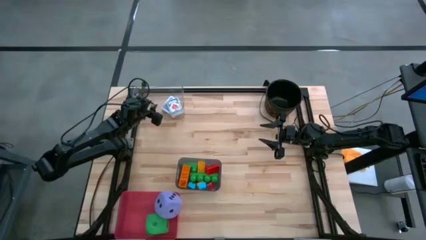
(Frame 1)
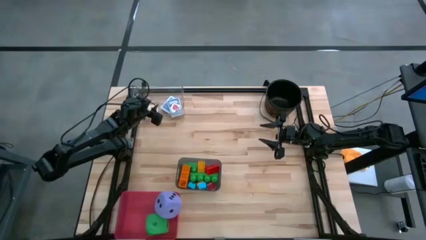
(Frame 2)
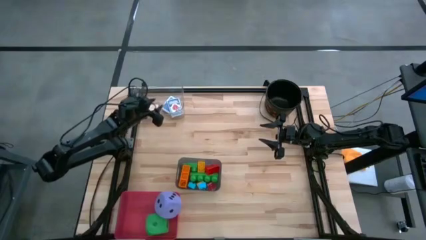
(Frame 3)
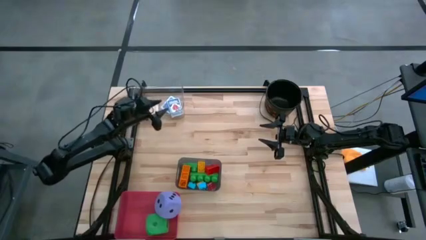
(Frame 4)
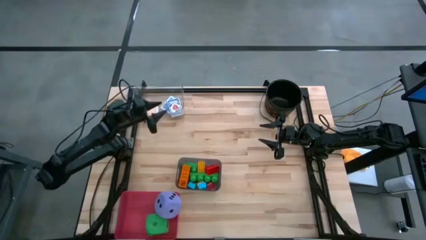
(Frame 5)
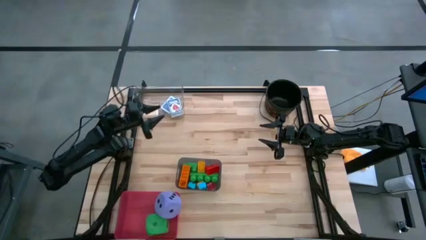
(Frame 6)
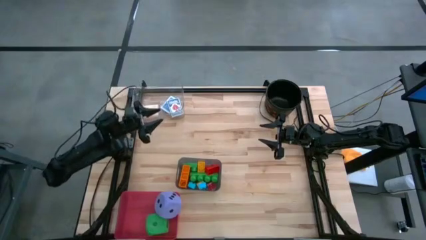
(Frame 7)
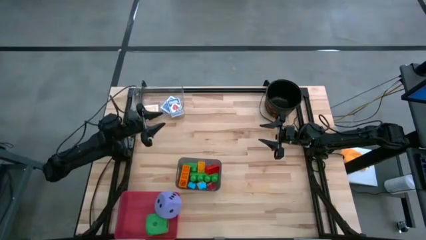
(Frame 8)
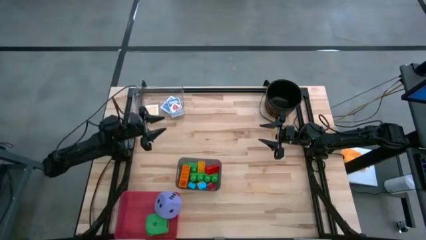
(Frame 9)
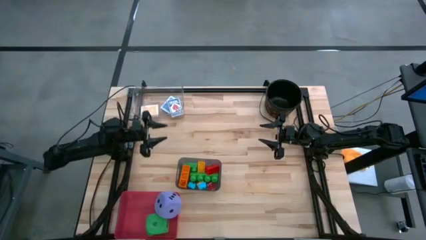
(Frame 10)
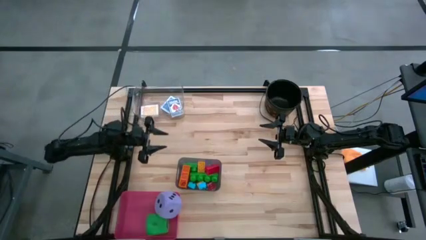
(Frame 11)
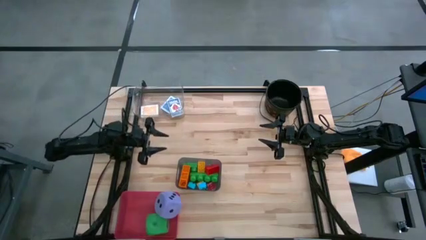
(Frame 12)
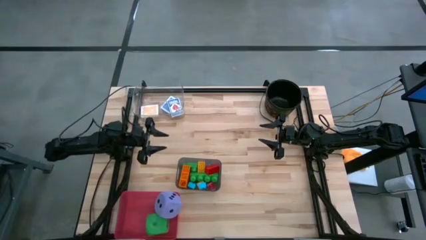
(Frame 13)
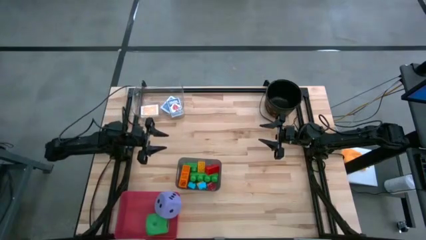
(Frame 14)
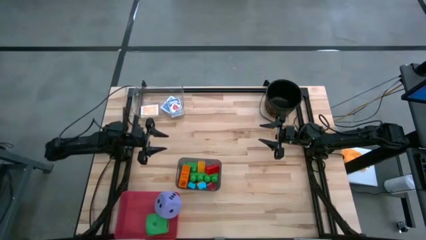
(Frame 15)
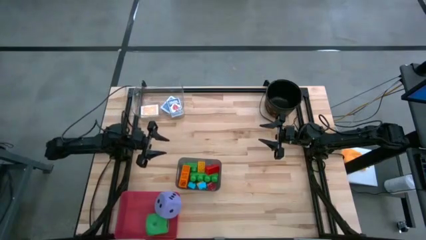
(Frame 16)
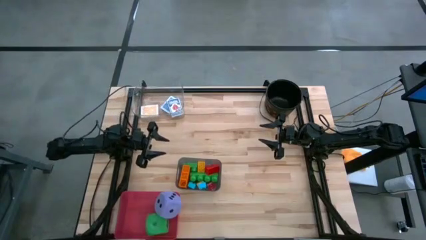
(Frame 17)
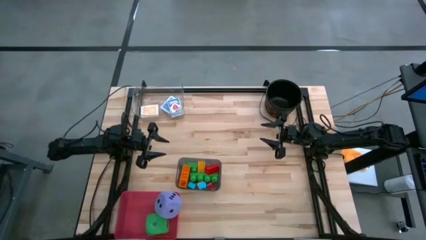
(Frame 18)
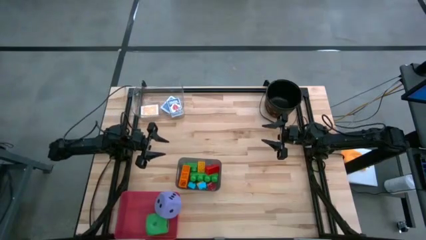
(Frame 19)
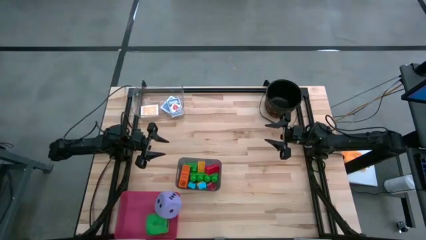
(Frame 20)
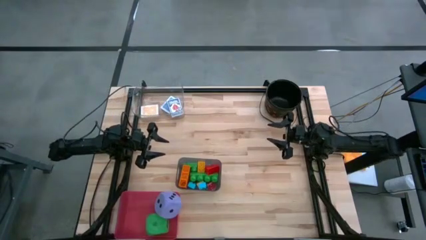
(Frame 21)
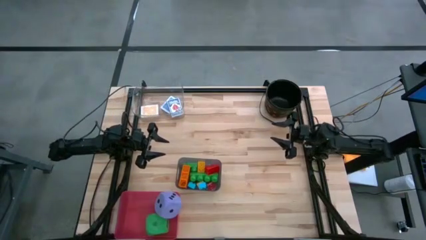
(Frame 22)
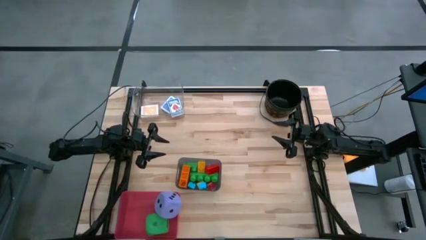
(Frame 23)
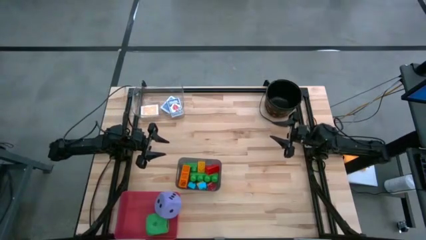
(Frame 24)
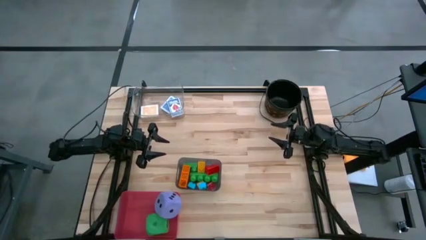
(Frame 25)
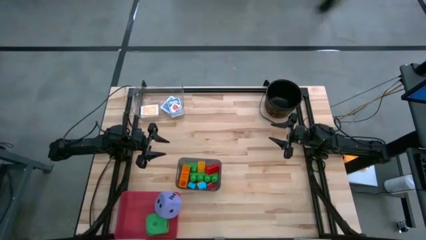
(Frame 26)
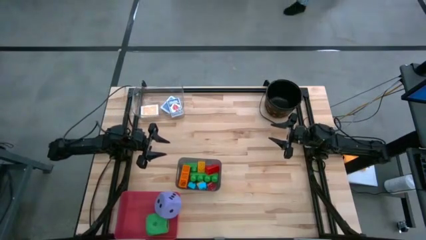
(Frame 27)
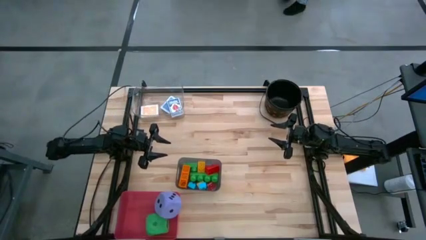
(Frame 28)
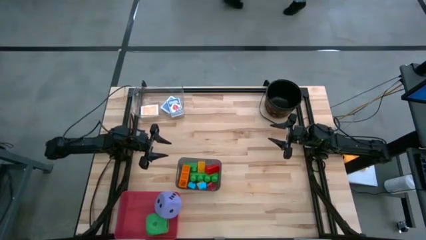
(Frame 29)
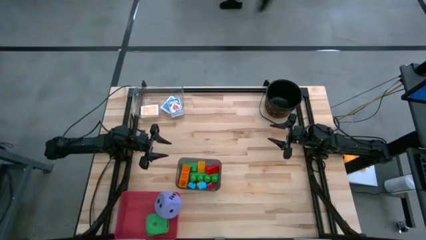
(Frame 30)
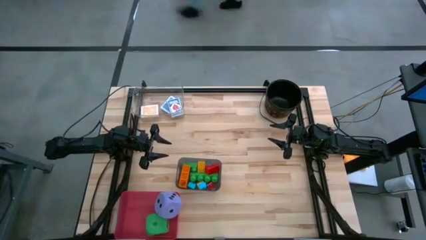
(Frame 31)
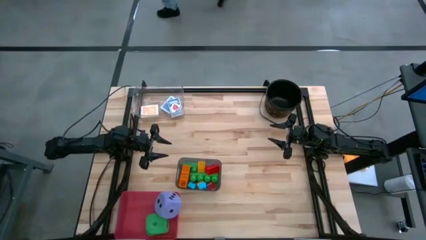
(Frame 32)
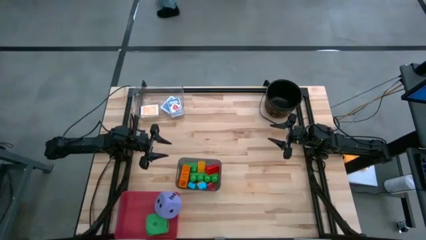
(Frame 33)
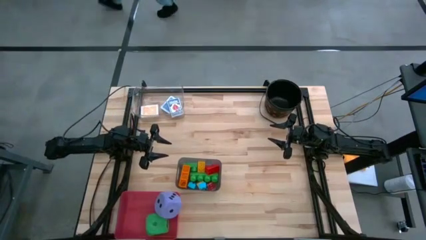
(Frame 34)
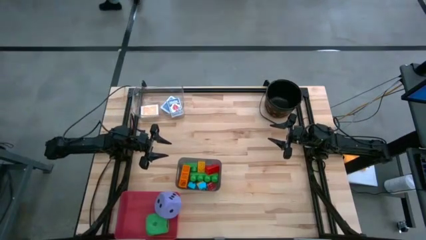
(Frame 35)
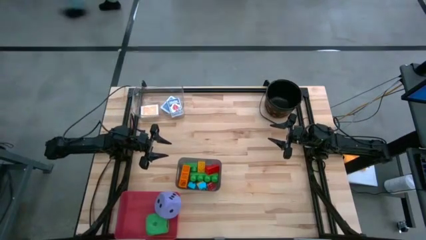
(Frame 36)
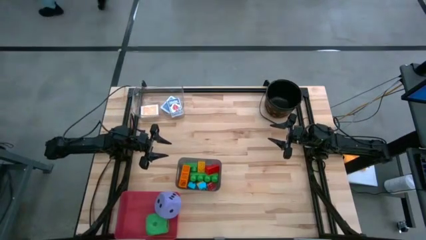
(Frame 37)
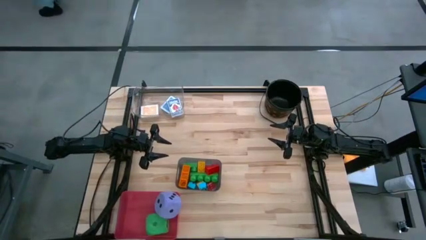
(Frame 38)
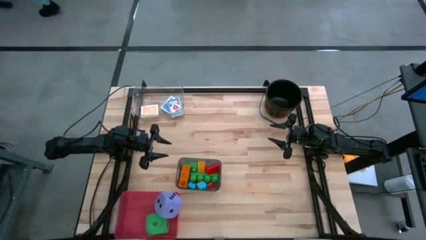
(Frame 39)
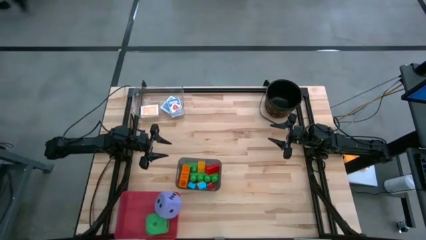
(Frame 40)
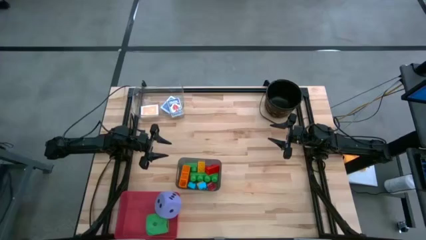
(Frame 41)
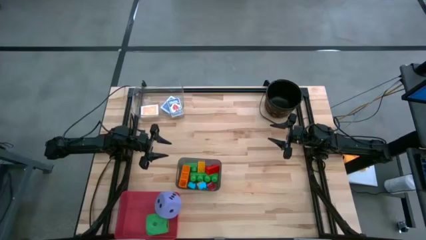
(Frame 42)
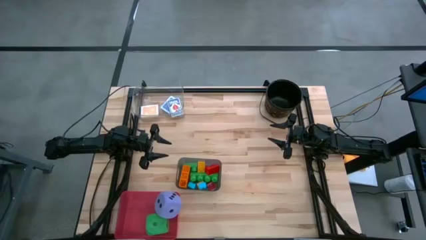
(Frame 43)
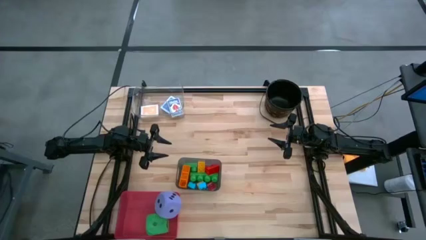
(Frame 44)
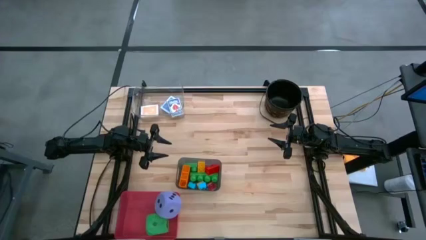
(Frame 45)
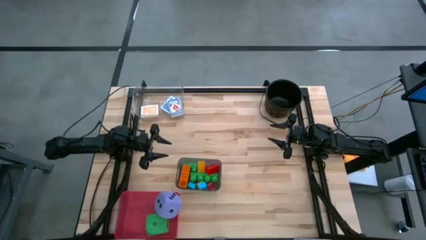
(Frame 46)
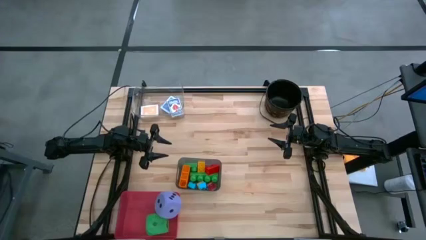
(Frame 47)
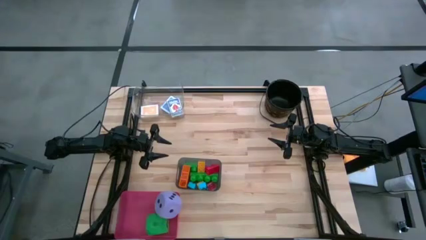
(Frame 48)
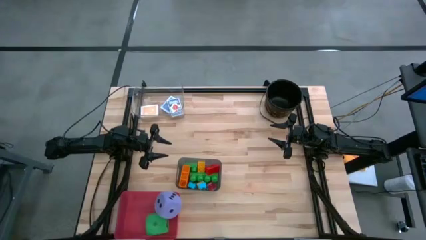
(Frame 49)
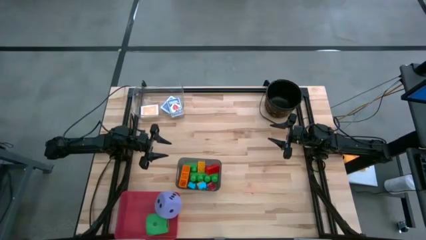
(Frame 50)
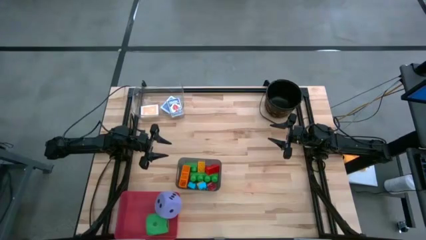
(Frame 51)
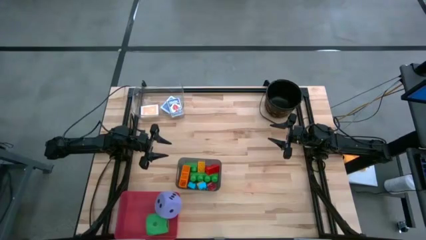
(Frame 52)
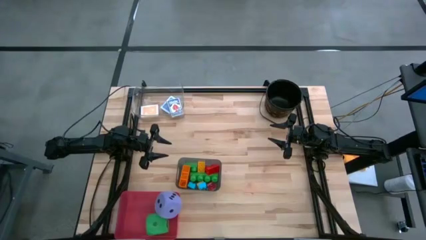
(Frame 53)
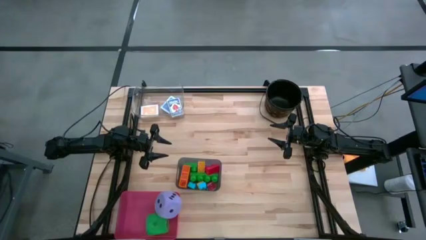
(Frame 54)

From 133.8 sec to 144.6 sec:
Task: Pick & Place Toys
Return to Home Position

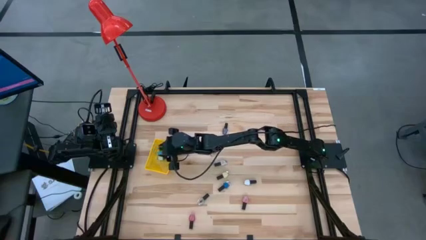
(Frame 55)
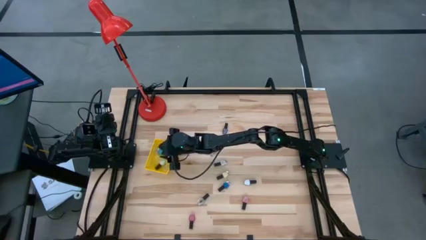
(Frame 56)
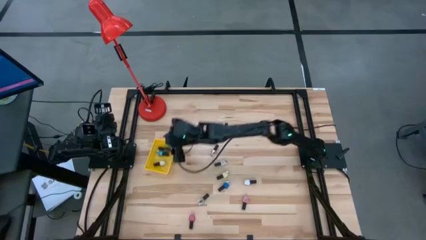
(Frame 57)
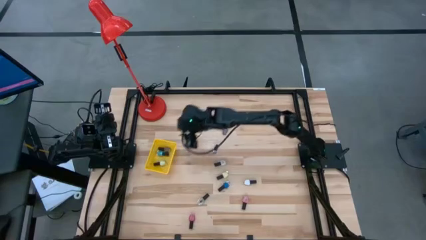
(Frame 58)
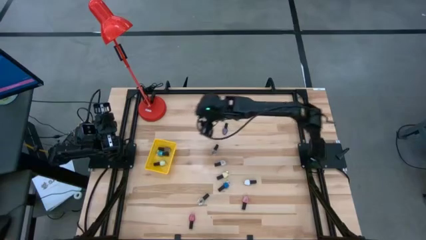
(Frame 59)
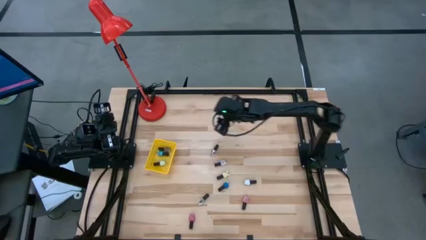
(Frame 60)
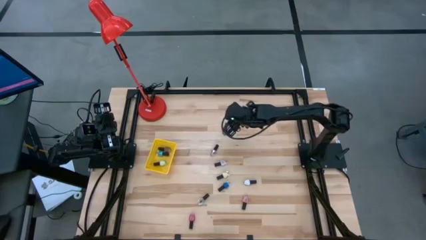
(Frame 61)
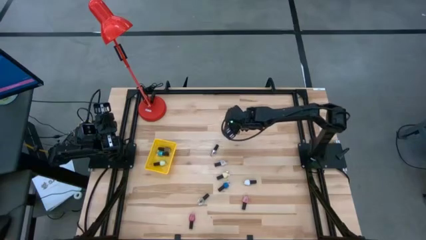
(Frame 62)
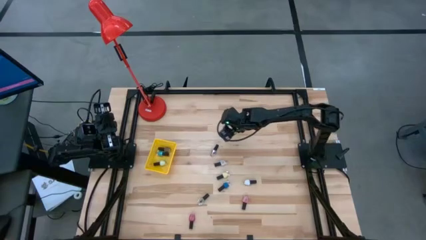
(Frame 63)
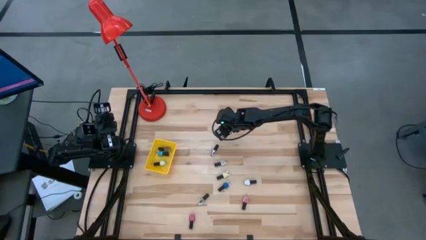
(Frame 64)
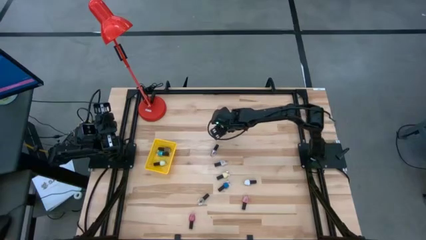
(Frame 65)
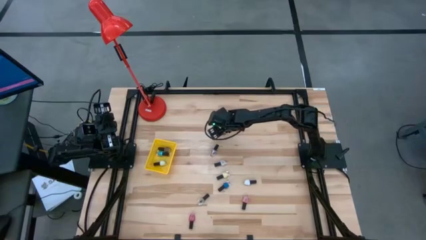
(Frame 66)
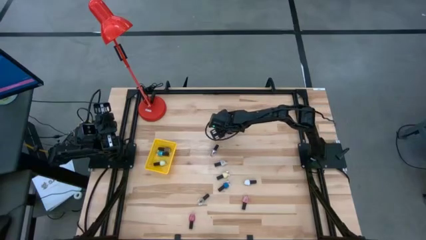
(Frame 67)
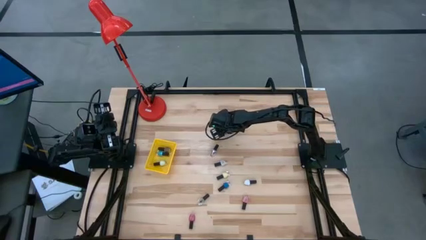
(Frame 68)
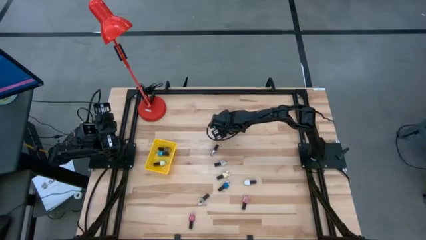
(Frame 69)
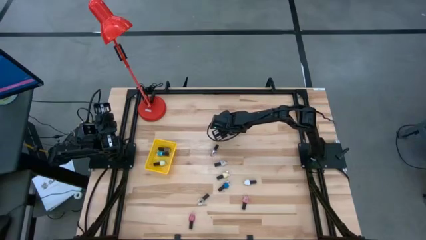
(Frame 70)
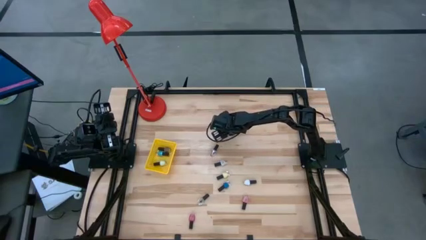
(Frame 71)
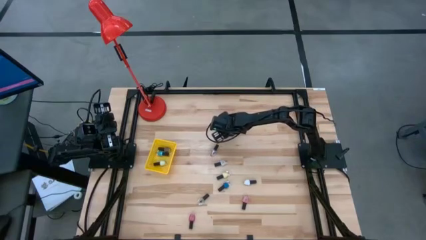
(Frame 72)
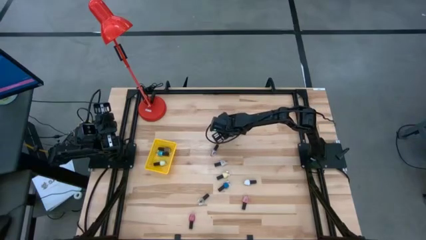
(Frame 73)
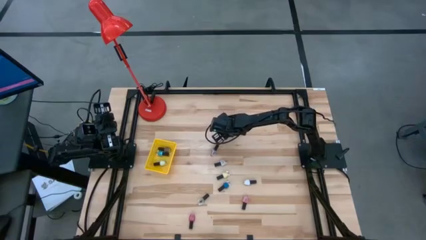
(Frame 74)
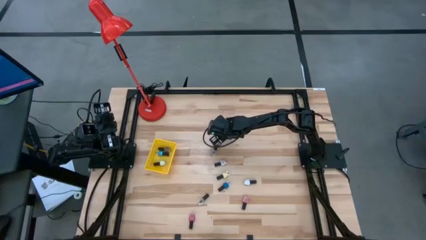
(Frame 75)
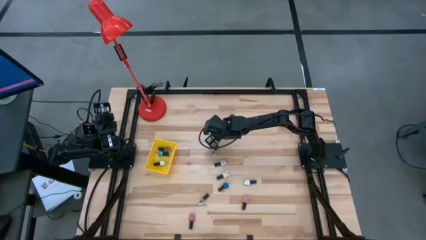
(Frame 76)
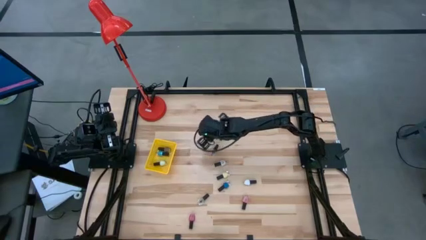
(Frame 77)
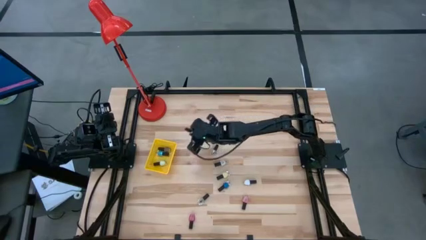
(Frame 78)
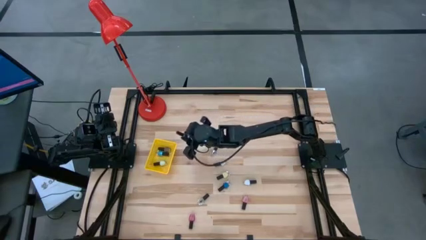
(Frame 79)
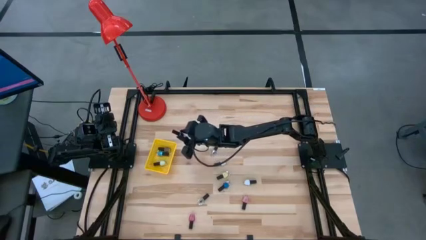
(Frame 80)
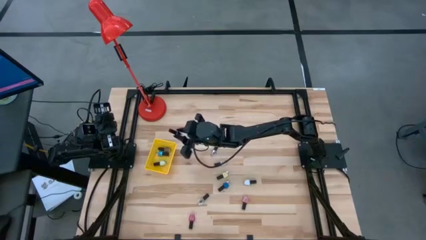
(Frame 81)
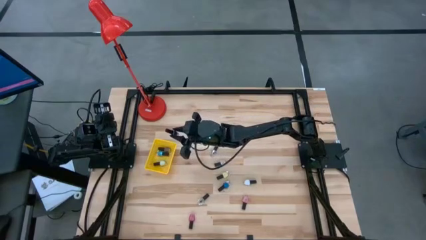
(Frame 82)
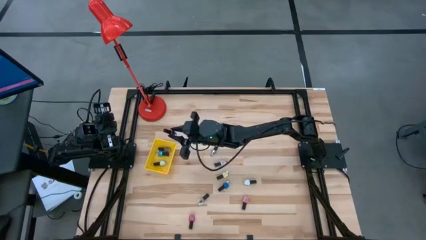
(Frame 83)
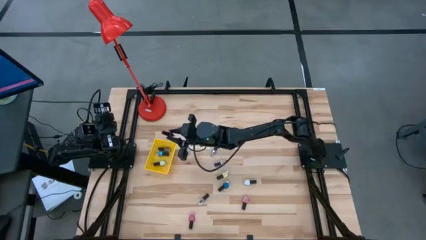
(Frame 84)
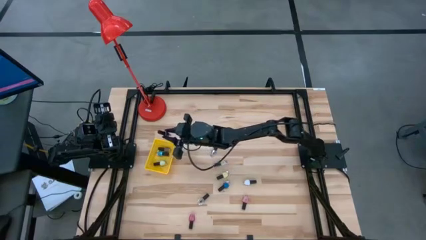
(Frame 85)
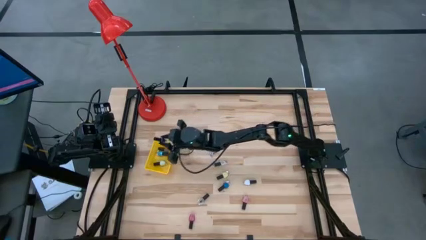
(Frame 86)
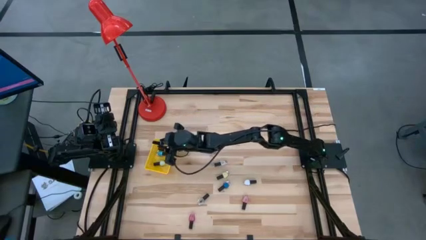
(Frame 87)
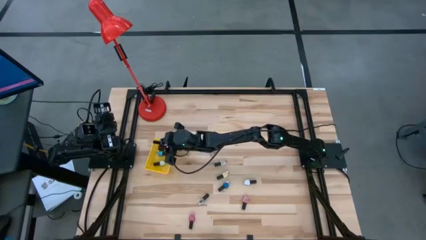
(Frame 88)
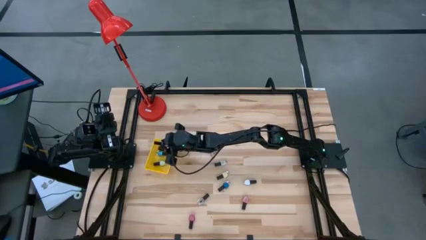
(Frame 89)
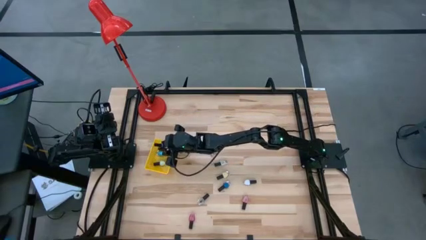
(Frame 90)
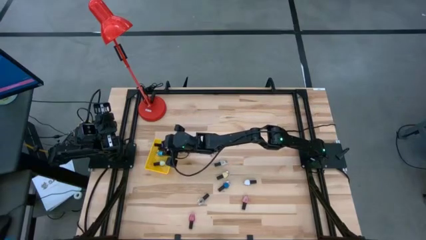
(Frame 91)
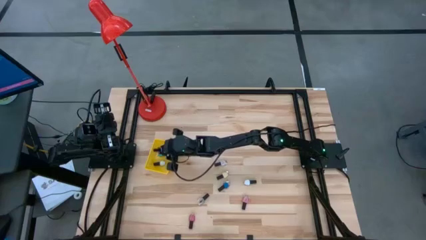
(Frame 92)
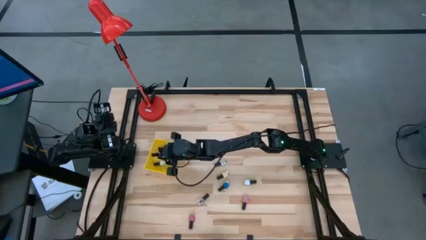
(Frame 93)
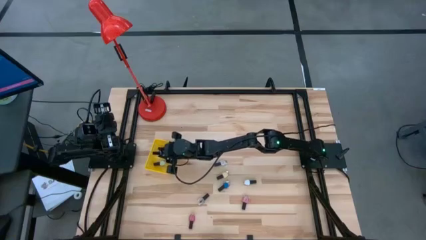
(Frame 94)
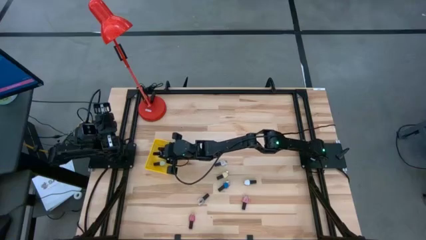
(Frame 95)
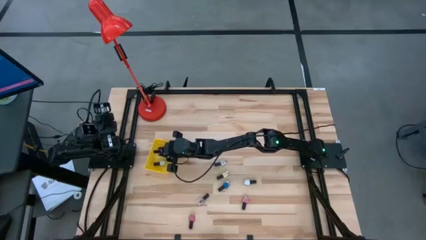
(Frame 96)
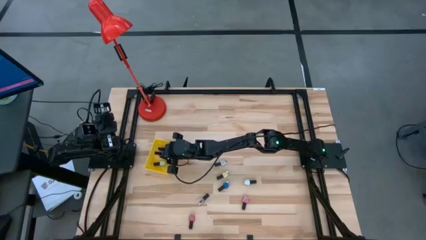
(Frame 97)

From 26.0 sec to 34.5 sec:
Task: Pick & Place Nail Polish
Put the violet nail polish bottle into the yellow basket
